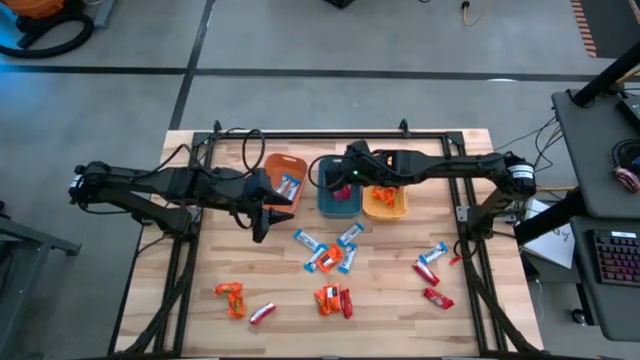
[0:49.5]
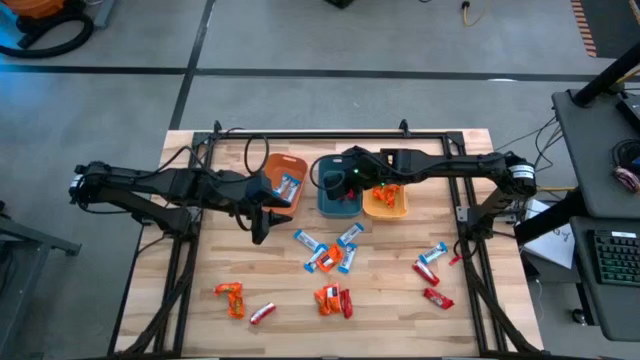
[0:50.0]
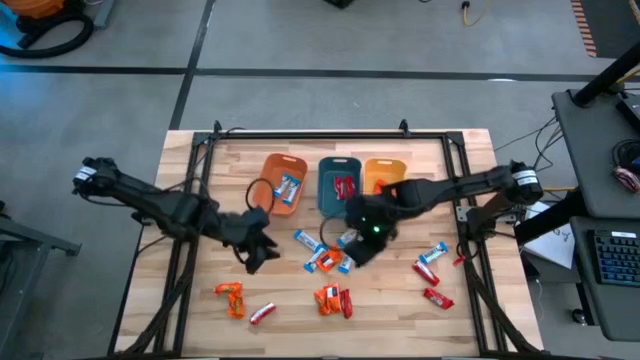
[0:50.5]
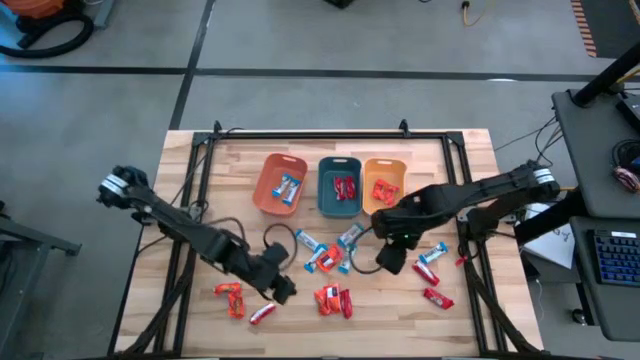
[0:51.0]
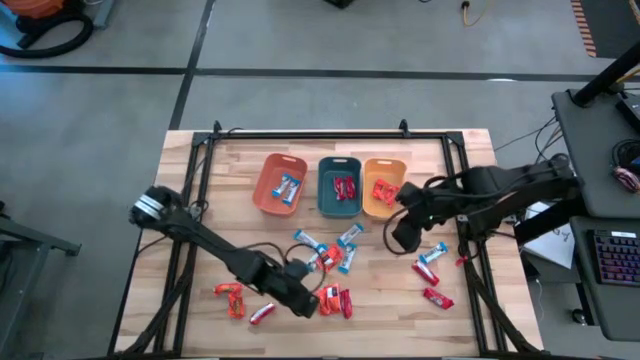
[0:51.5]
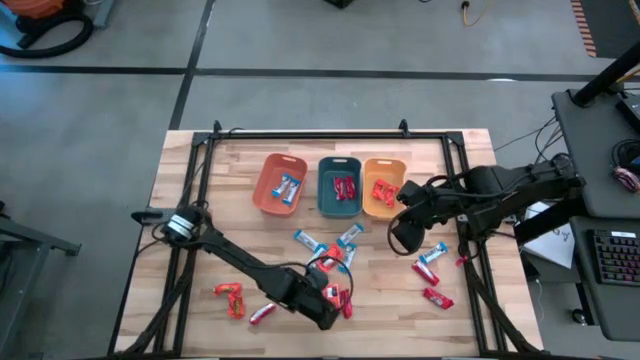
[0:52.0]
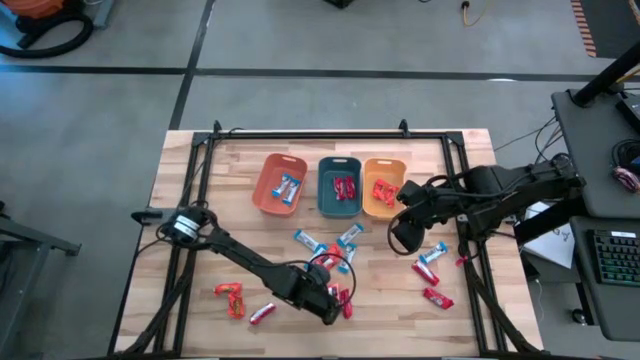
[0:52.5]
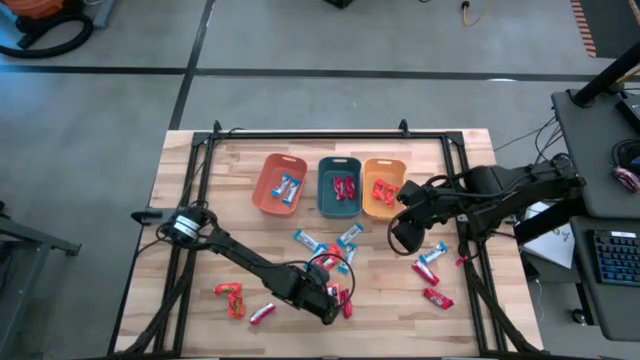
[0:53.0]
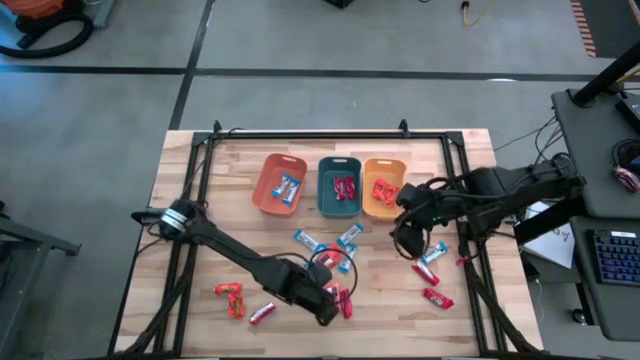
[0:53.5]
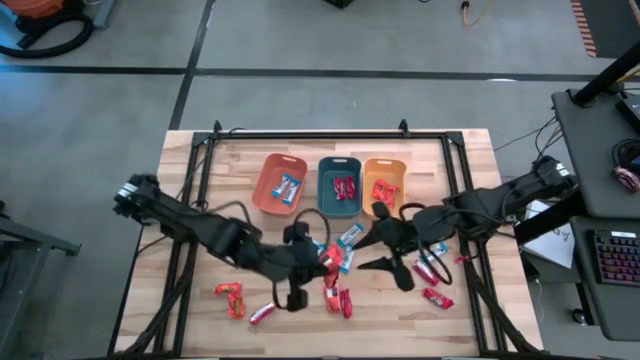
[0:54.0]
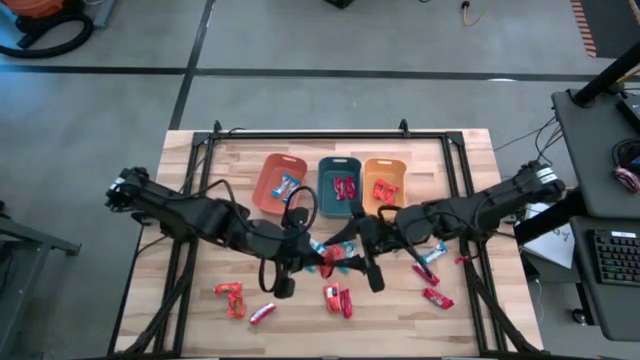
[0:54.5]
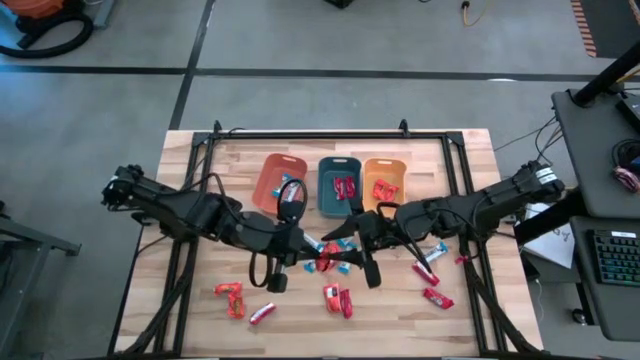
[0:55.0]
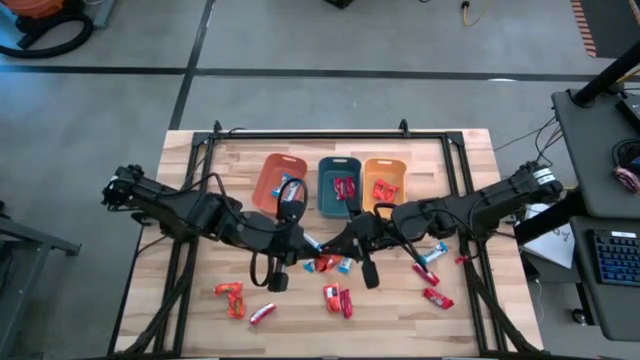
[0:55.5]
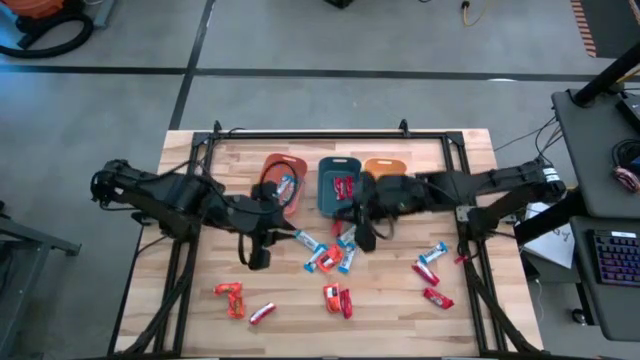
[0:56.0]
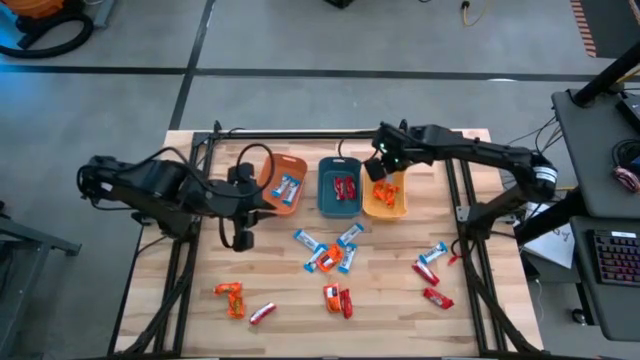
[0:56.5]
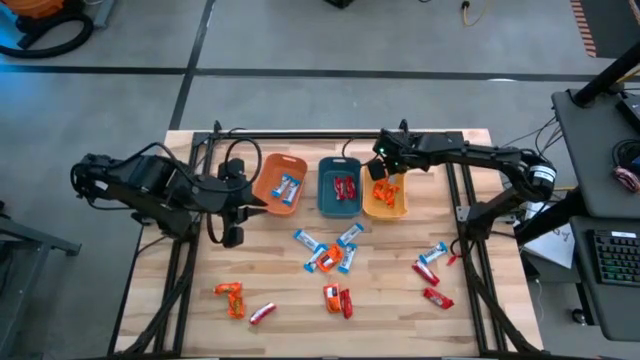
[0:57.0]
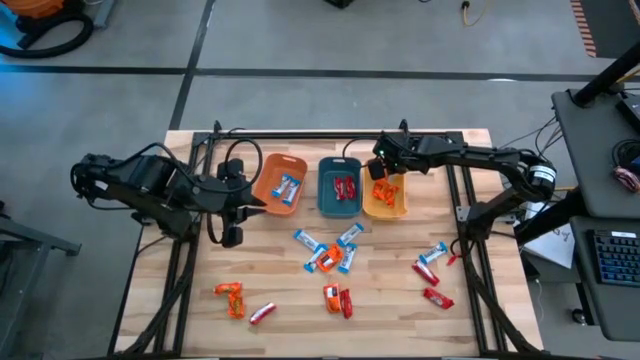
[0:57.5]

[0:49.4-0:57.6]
Task: Sort candy
Put the orange chocolate bar into the yellow bin

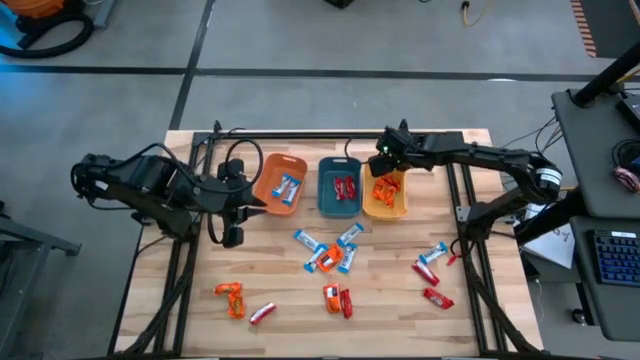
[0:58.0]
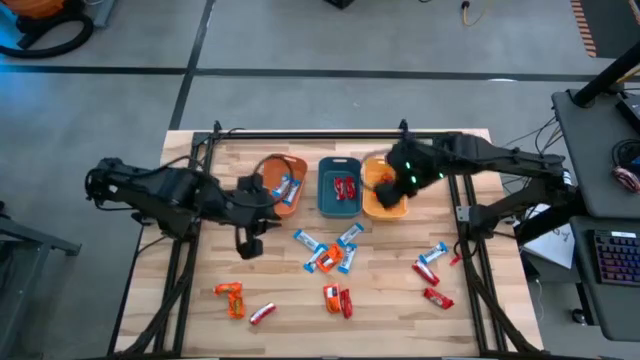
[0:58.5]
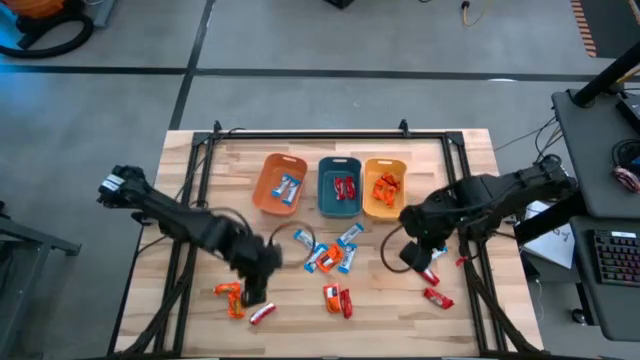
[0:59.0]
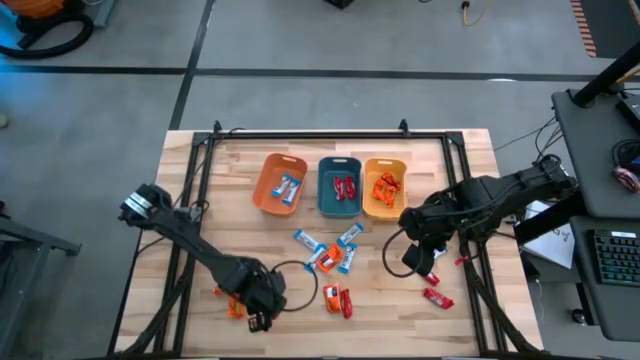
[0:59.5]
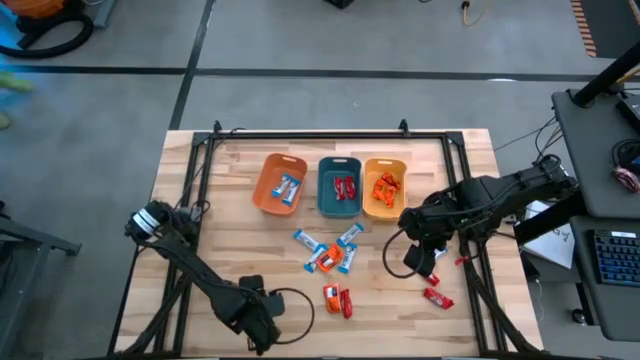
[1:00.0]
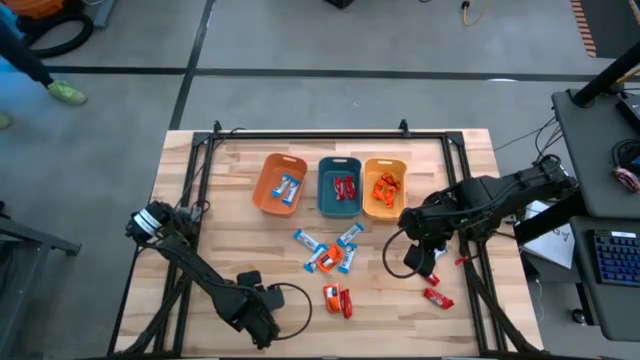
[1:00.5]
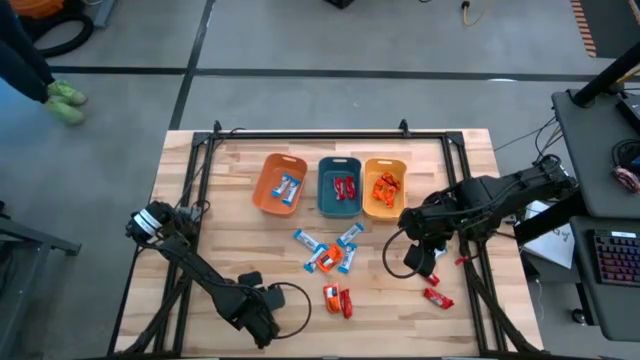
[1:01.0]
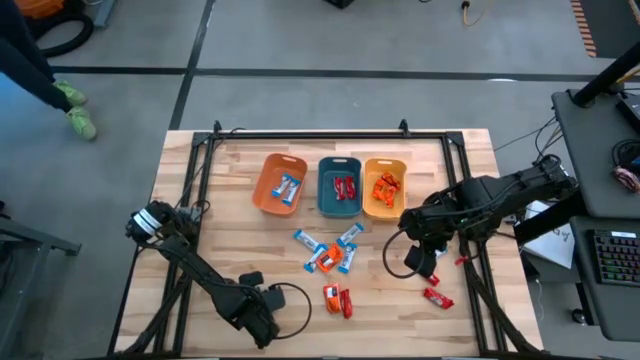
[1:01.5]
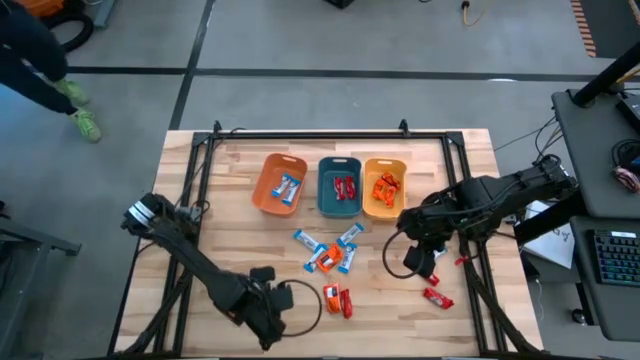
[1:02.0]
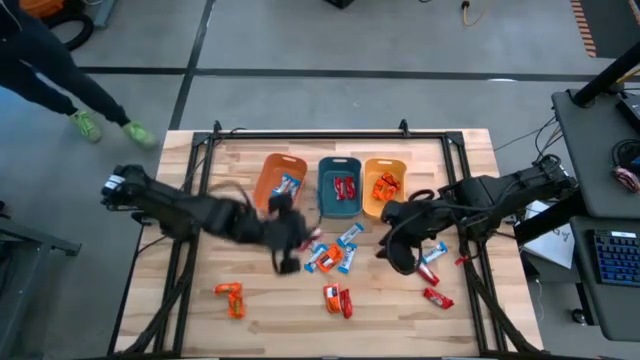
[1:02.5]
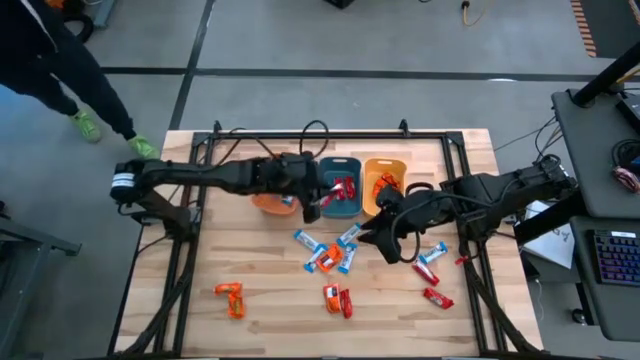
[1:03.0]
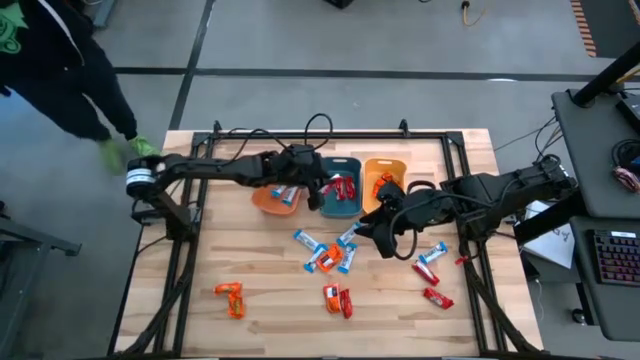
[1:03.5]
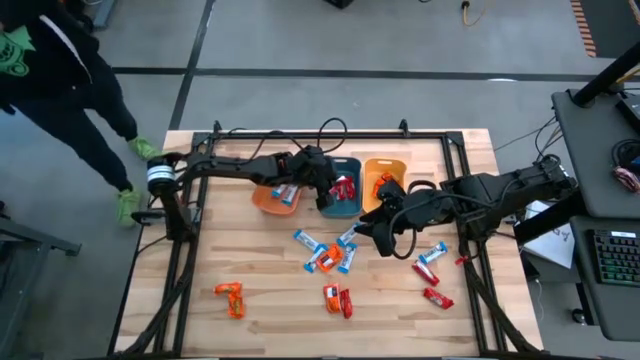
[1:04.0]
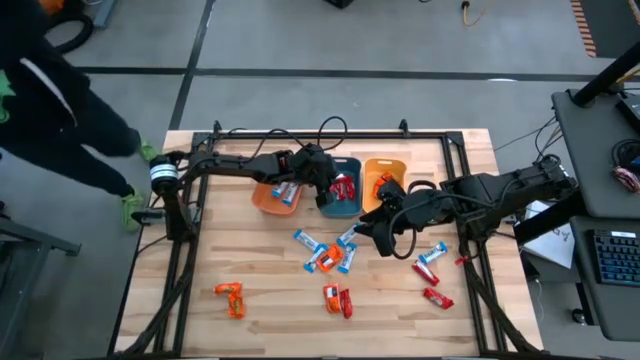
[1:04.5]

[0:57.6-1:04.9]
Put the red chocolate bar into the blue bin

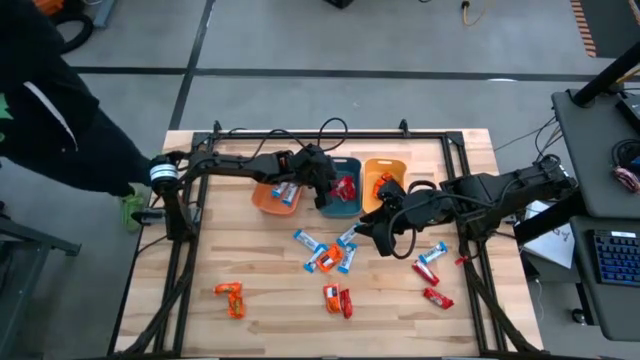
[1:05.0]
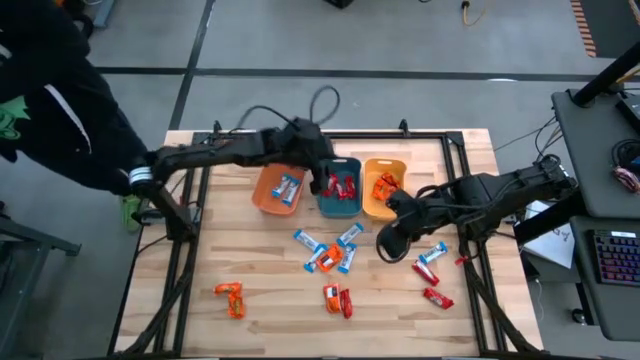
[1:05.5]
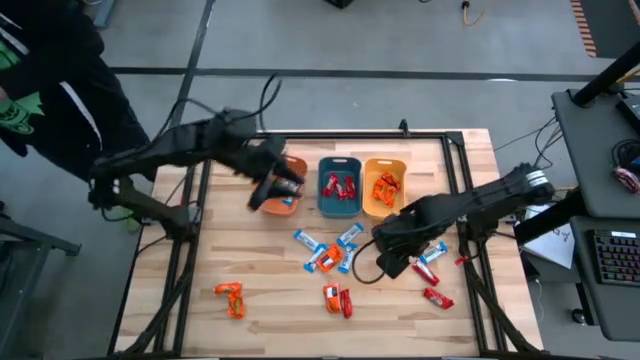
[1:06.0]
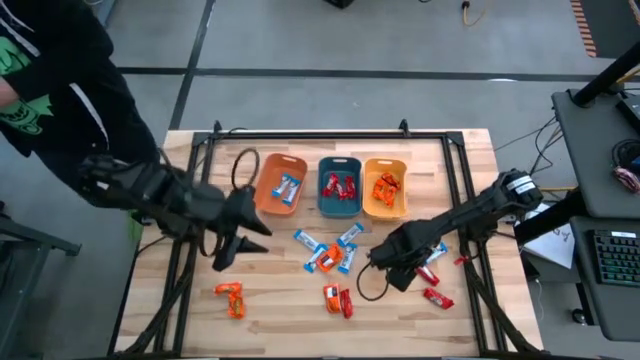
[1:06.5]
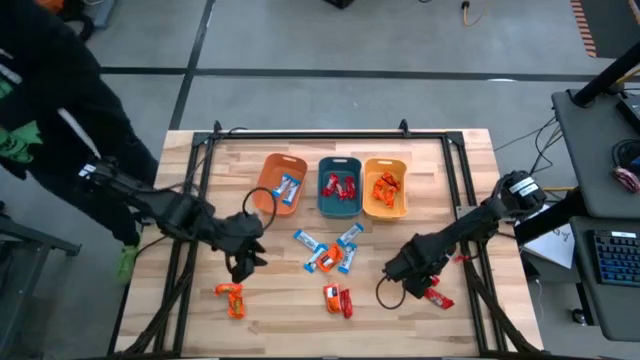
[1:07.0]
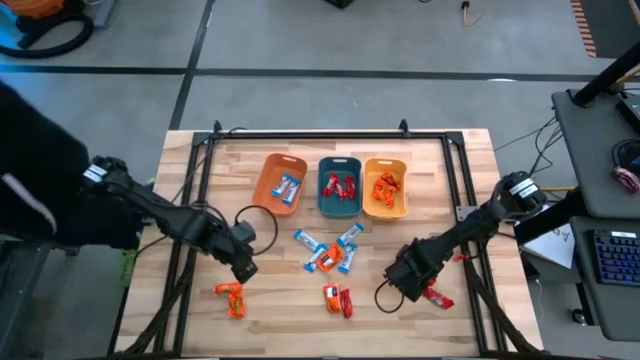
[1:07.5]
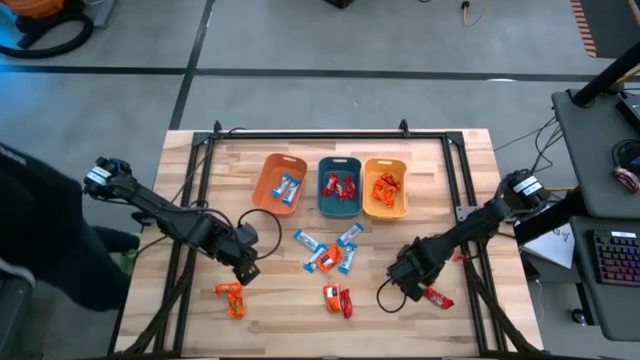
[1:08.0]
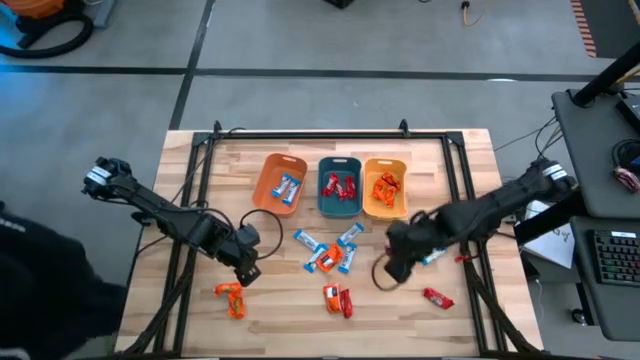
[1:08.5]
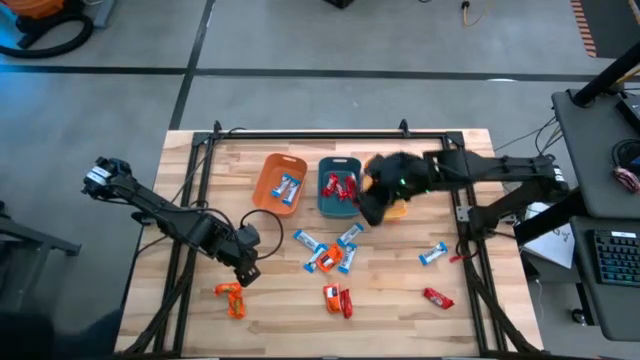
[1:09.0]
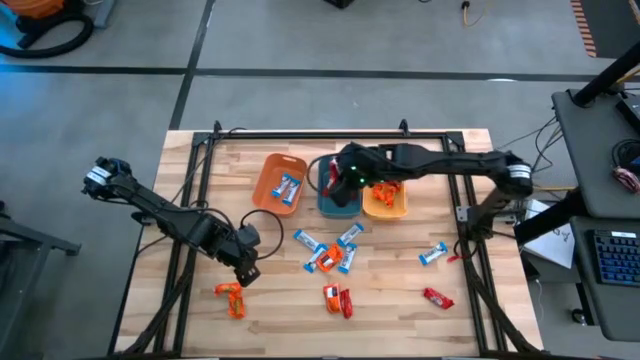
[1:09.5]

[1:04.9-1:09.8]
Put the red chocolate bar into the blue bin

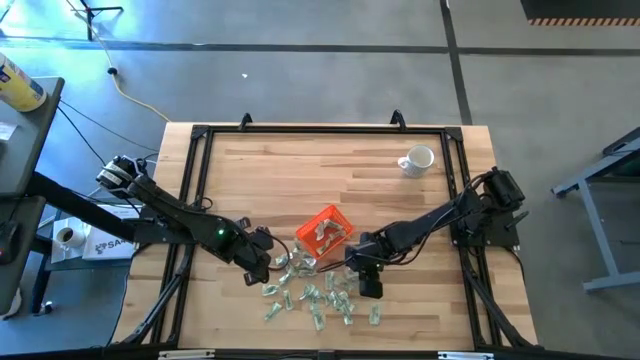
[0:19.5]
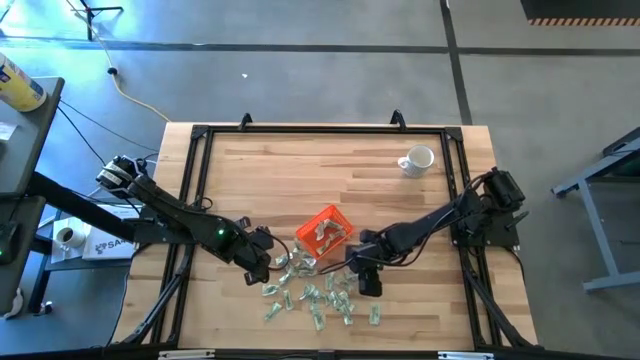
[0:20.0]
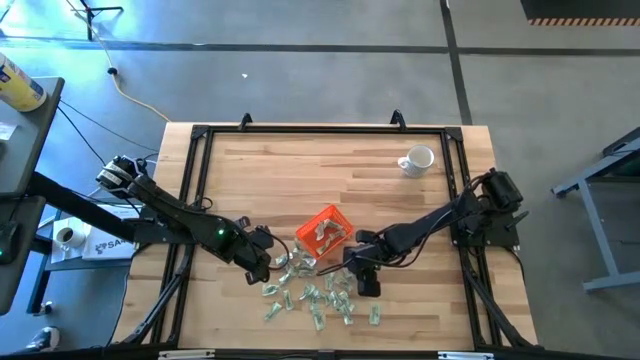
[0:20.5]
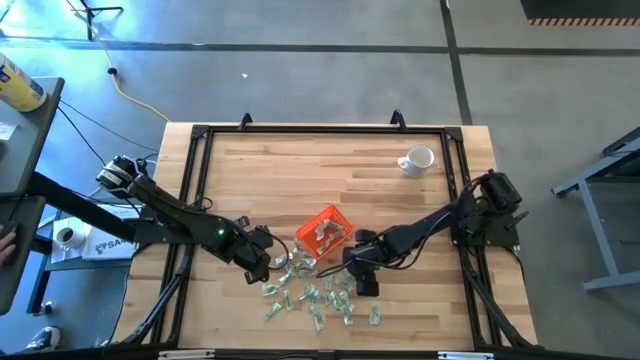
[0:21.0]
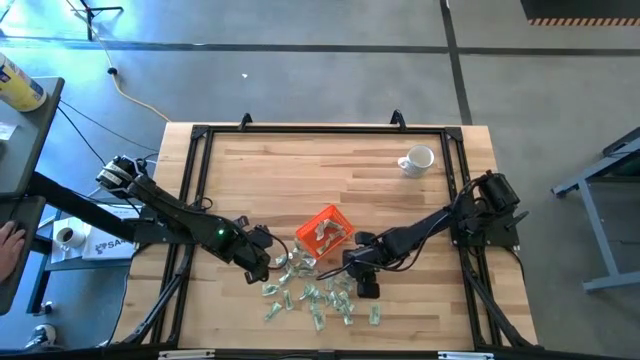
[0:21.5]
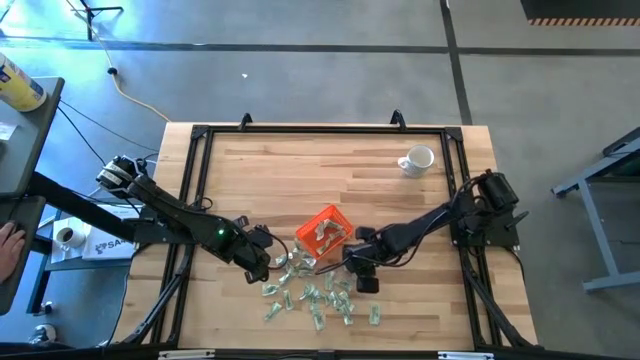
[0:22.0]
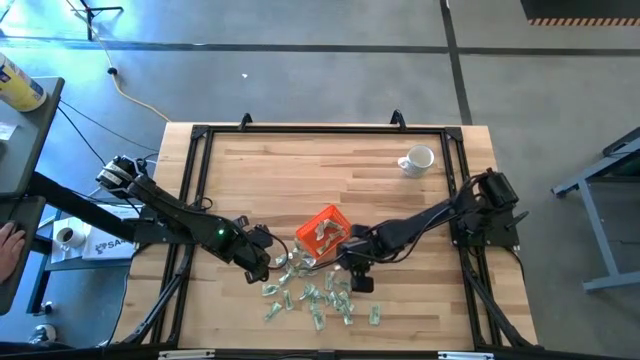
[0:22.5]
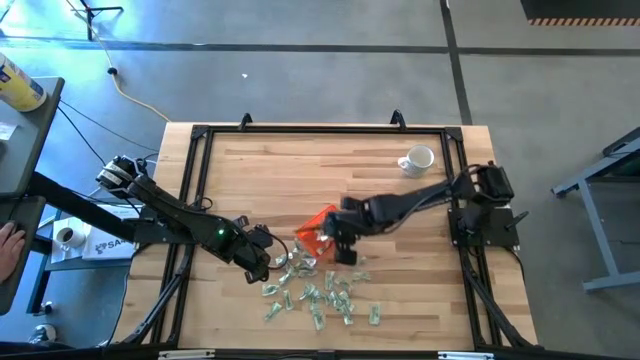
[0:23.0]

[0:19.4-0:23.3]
Task: Pick and place Stevia / Truvia into bins
Put the stevia packet into the orange bin
